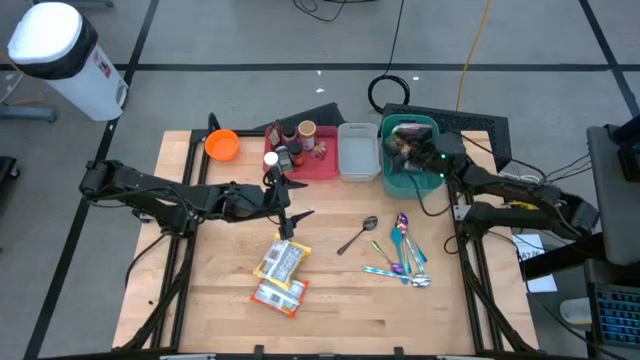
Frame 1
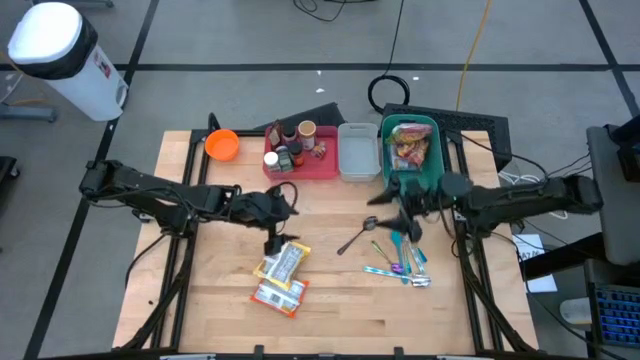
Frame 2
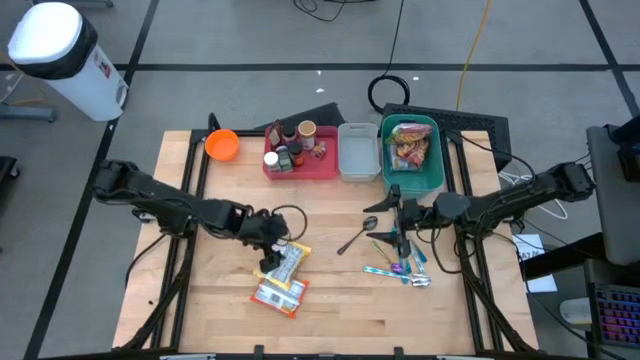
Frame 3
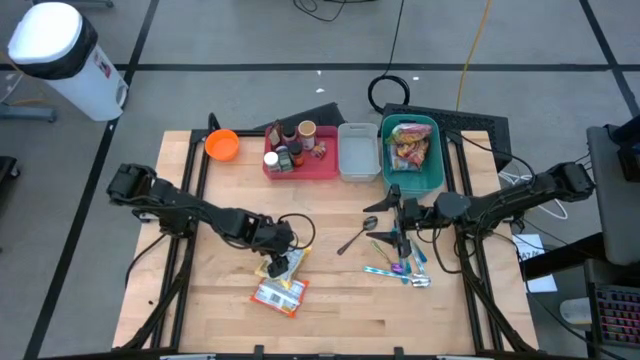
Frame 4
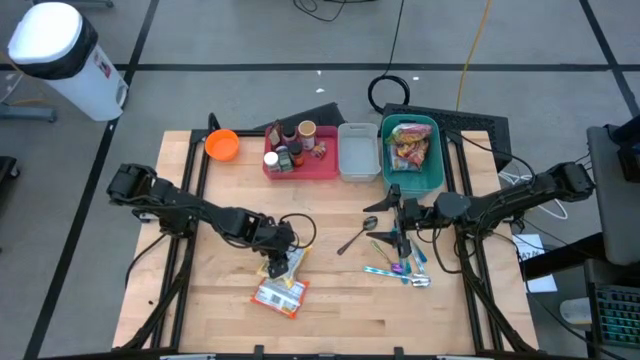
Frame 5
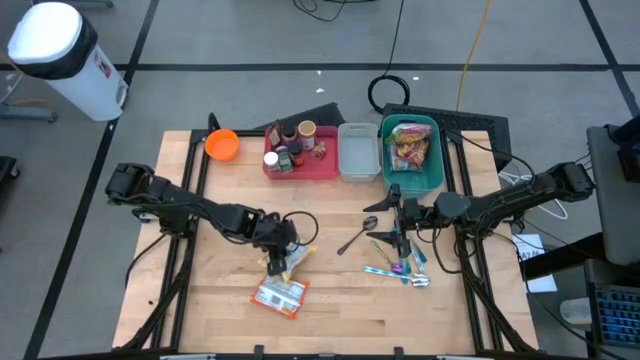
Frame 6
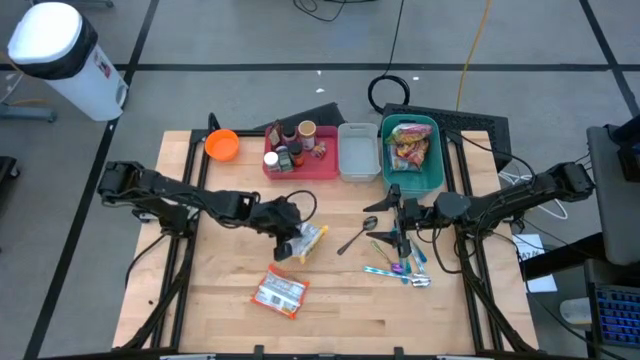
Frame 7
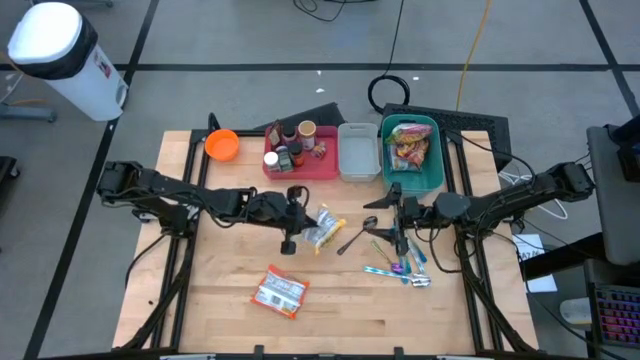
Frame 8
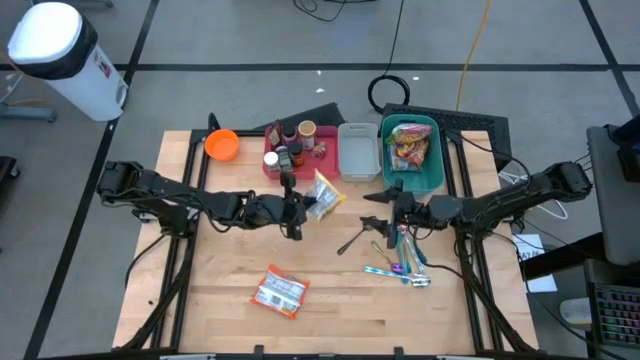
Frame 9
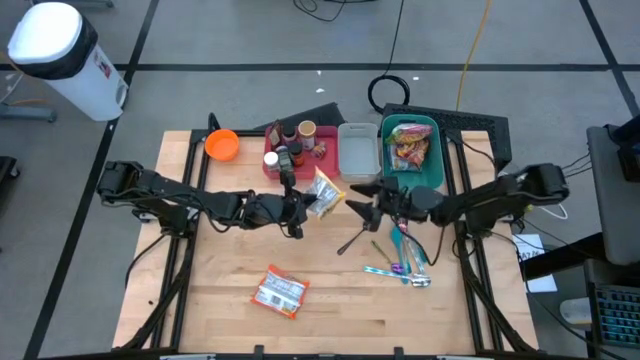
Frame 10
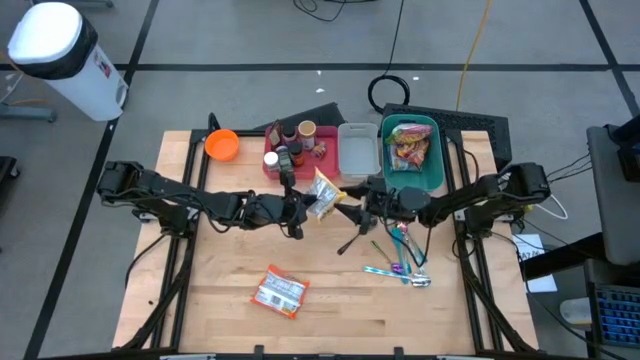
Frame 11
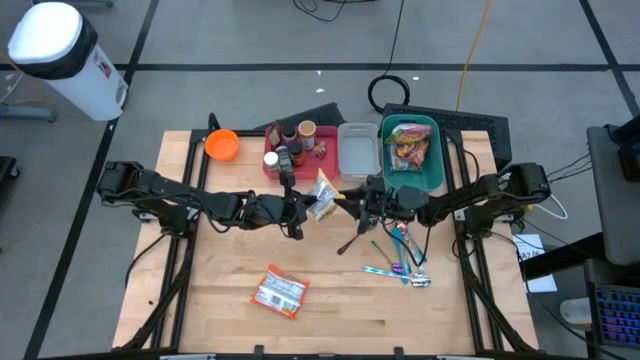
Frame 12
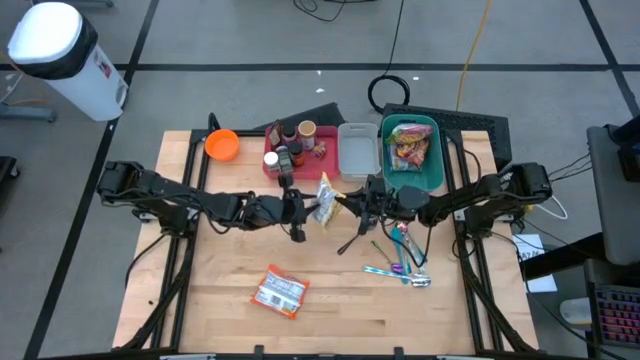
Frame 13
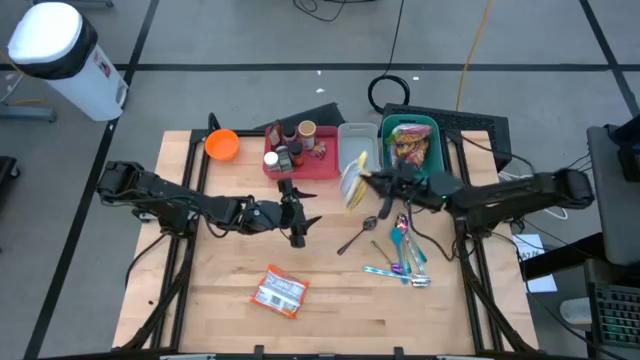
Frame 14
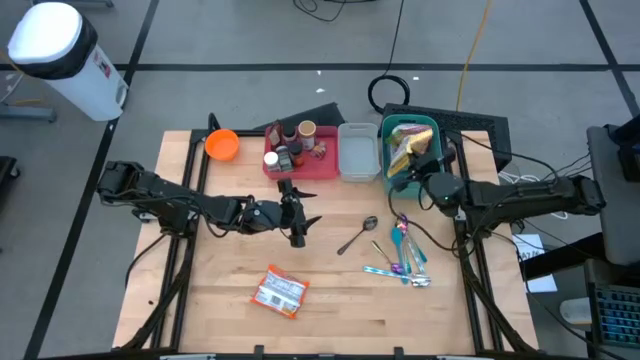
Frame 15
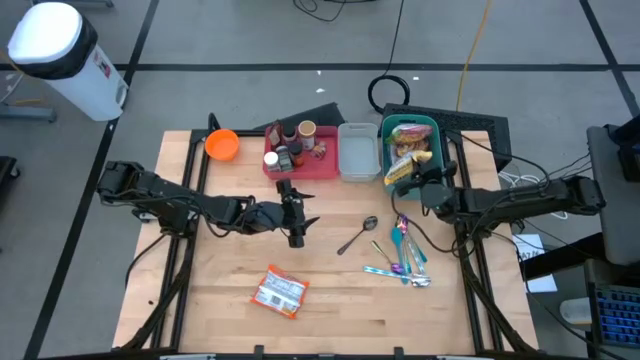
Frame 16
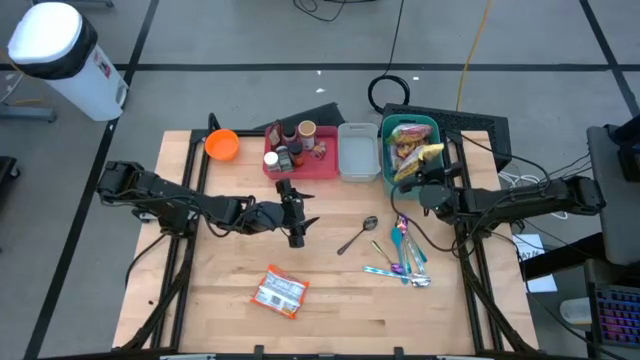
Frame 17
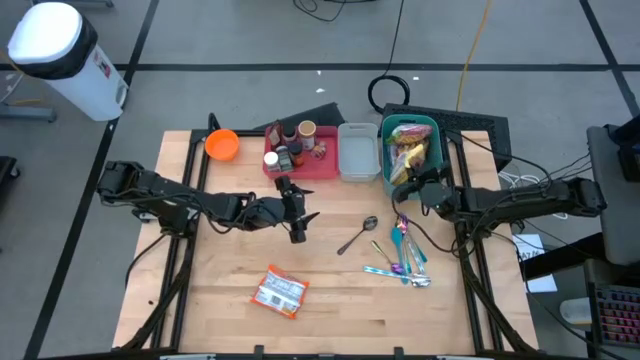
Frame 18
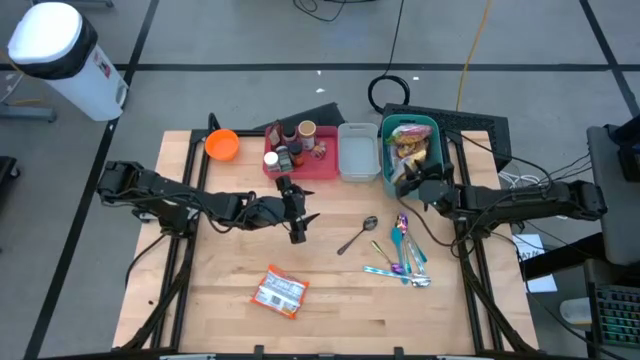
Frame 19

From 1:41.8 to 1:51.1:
Task: Pick & Place Food Item
Put the yellow noodle pack into the green bin

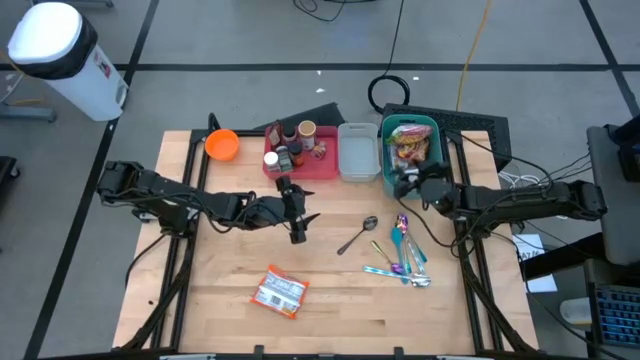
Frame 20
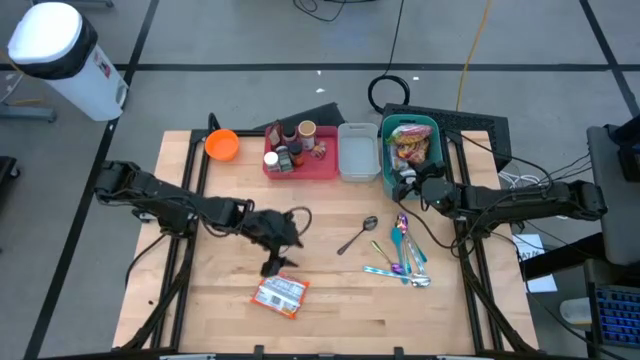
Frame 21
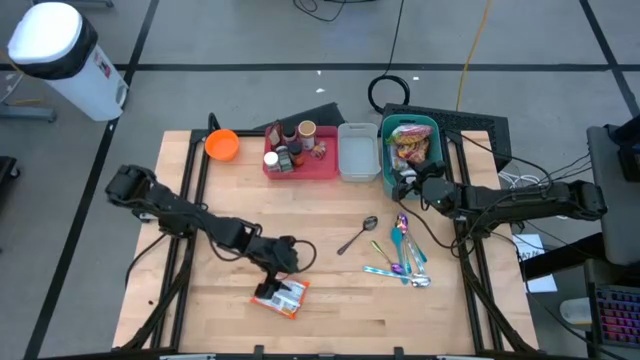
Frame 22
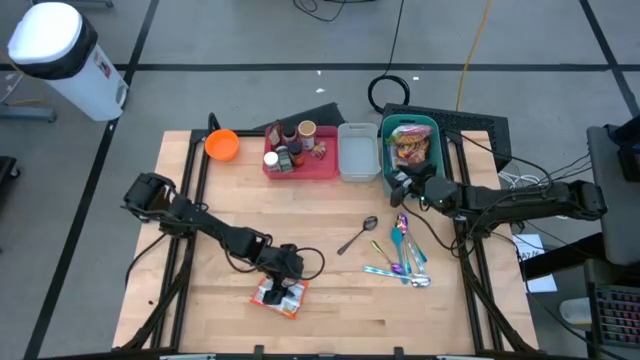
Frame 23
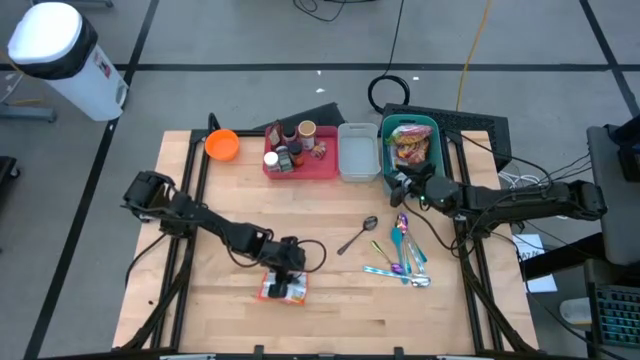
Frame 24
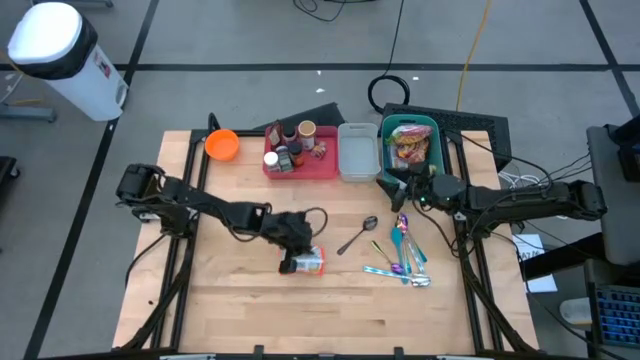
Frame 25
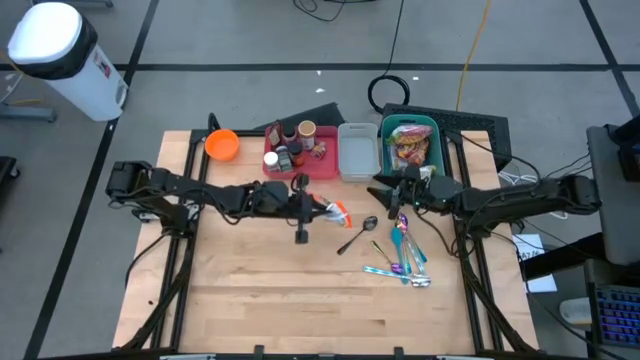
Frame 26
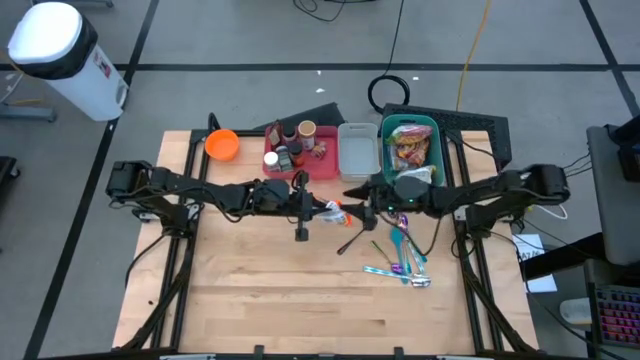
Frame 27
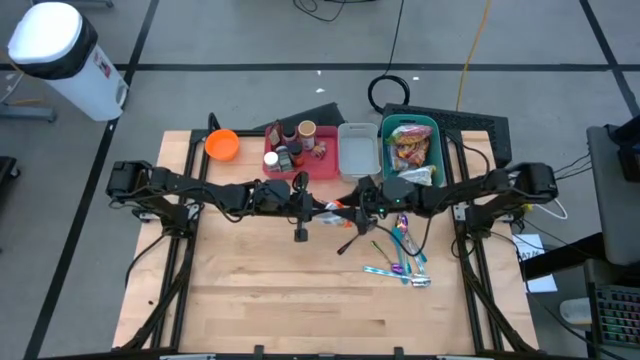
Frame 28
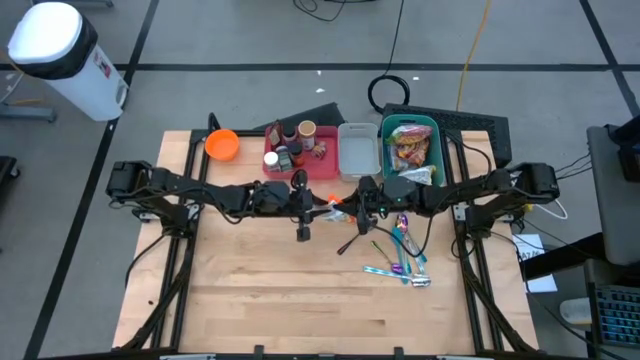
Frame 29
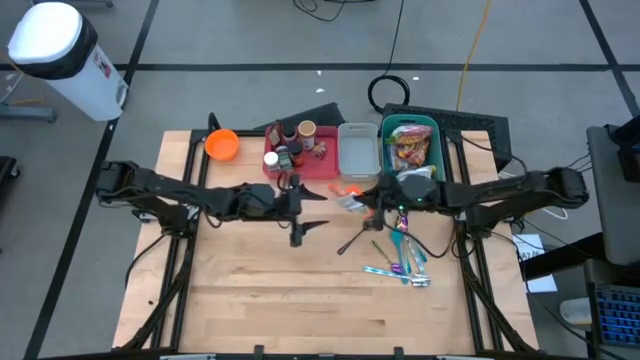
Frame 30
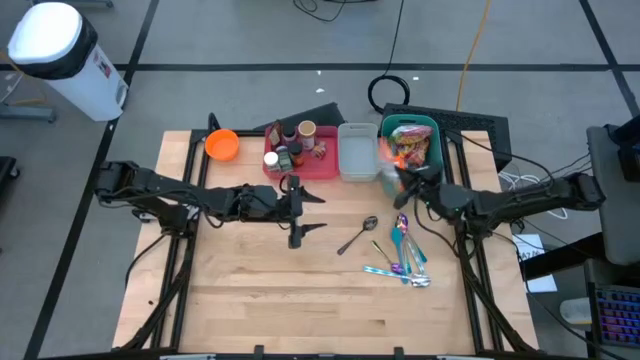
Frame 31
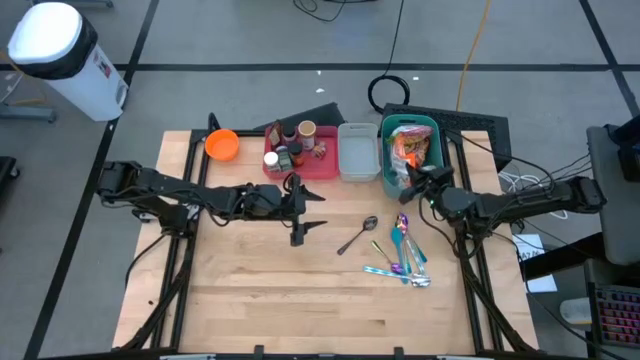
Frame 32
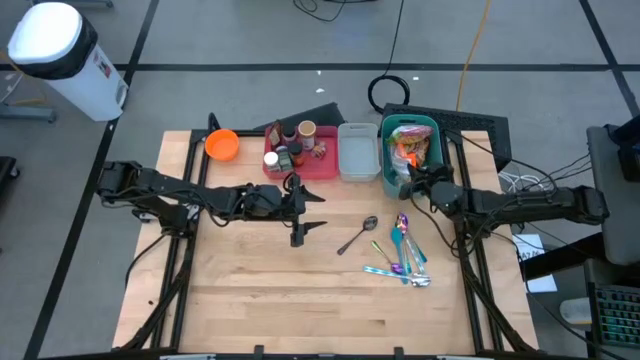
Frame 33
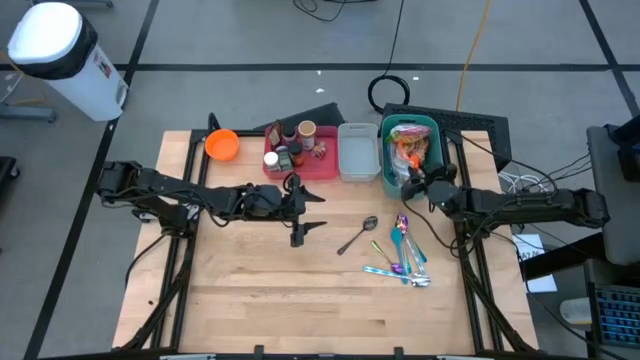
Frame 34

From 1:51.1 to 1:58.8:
Put the orange noodle pack into the green bin
